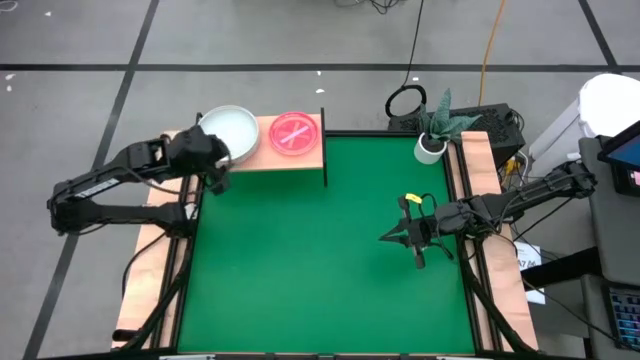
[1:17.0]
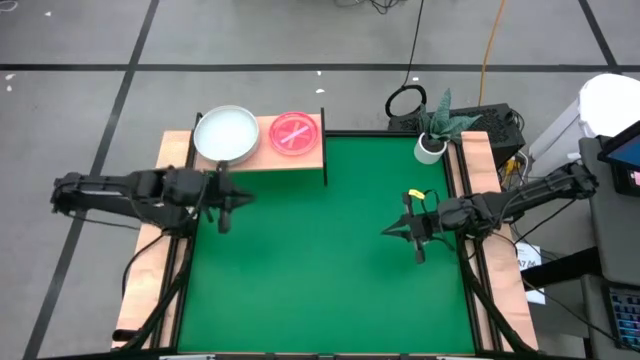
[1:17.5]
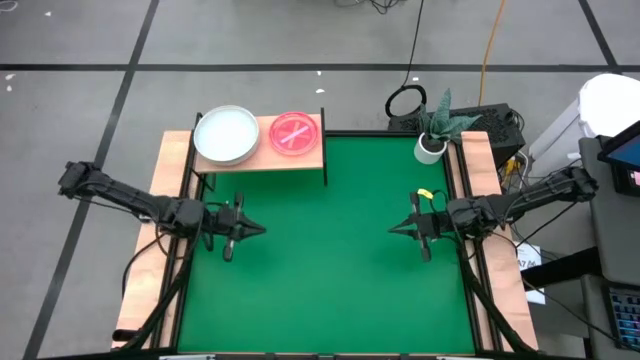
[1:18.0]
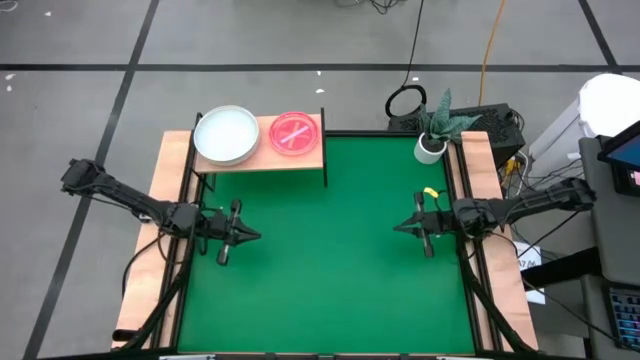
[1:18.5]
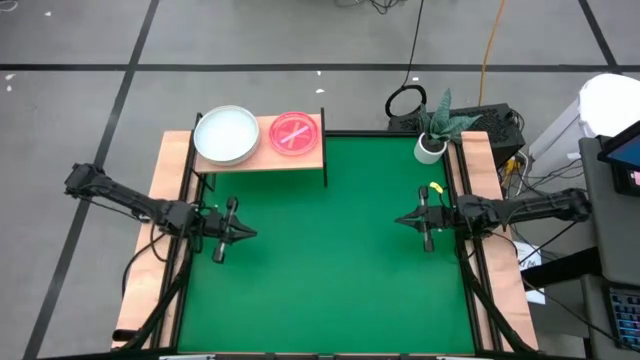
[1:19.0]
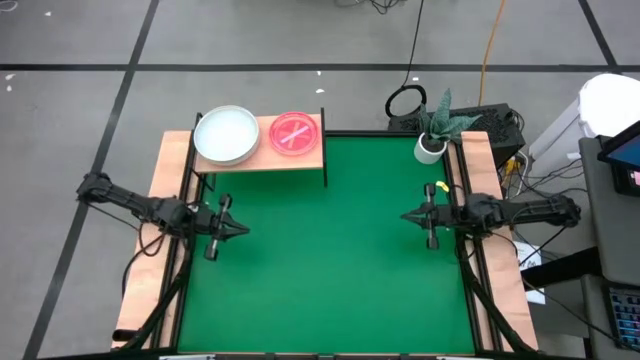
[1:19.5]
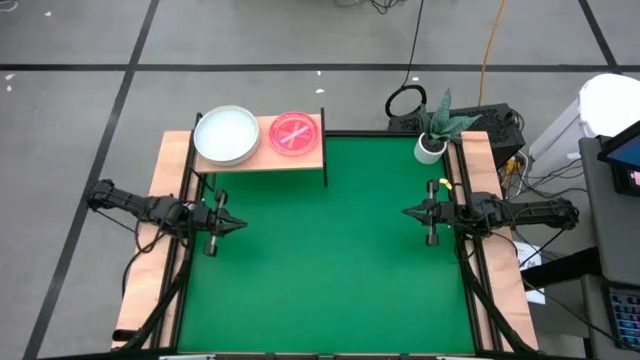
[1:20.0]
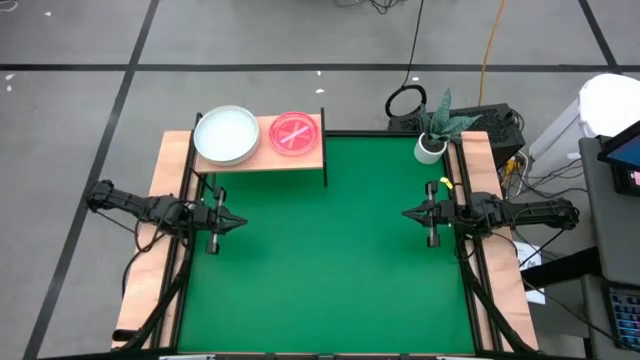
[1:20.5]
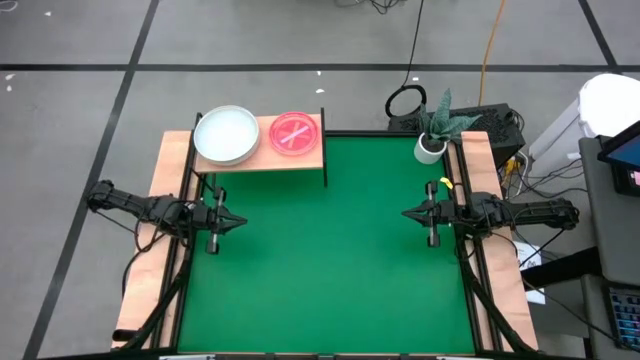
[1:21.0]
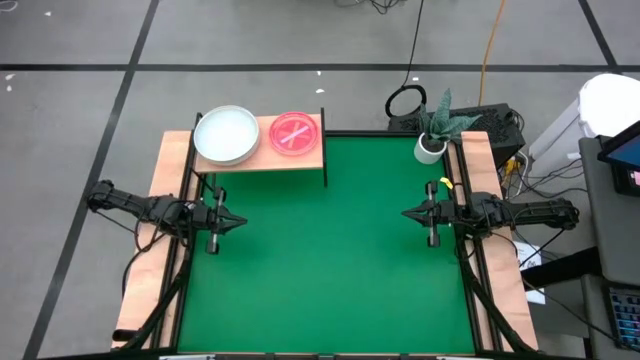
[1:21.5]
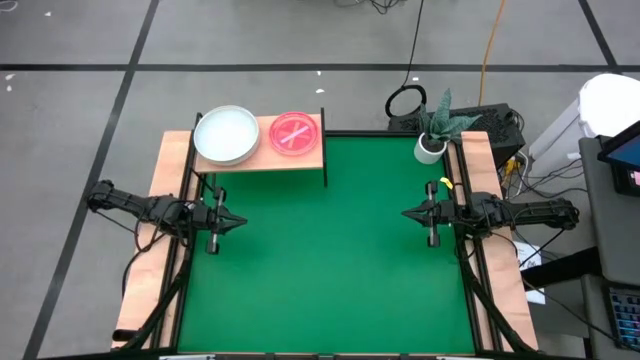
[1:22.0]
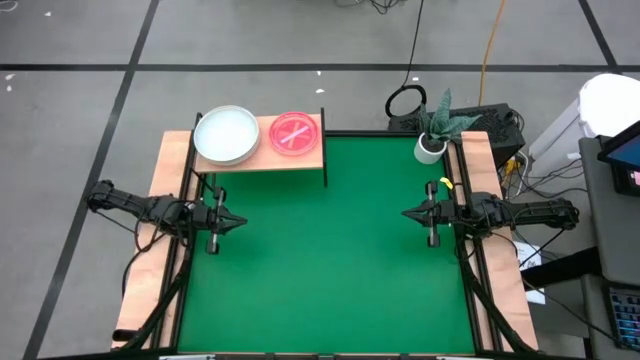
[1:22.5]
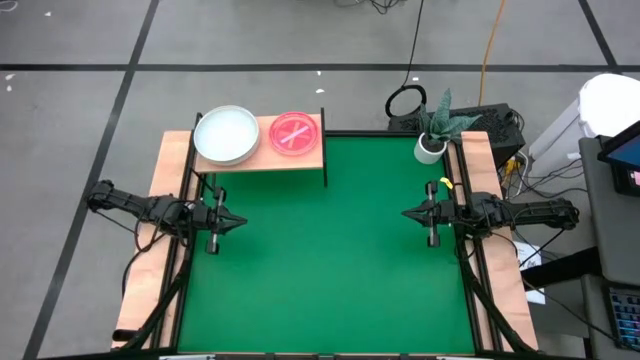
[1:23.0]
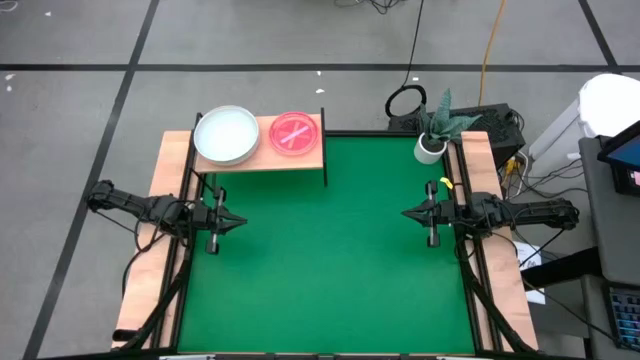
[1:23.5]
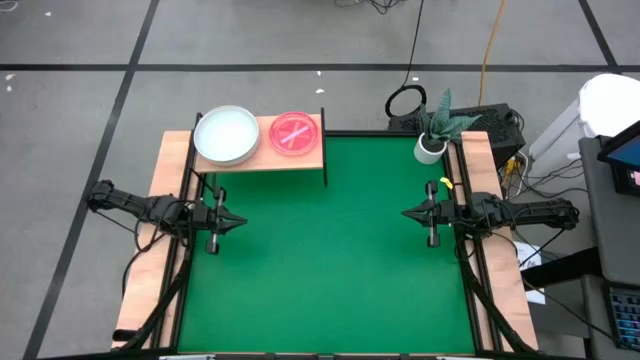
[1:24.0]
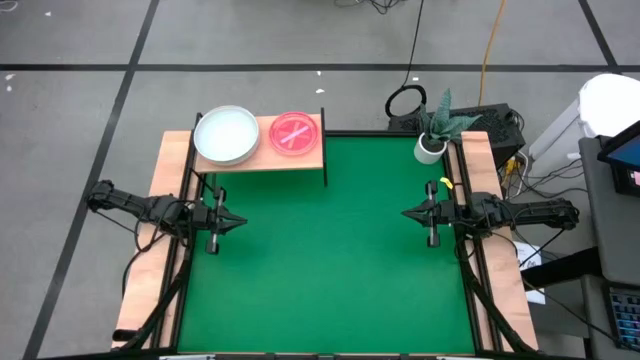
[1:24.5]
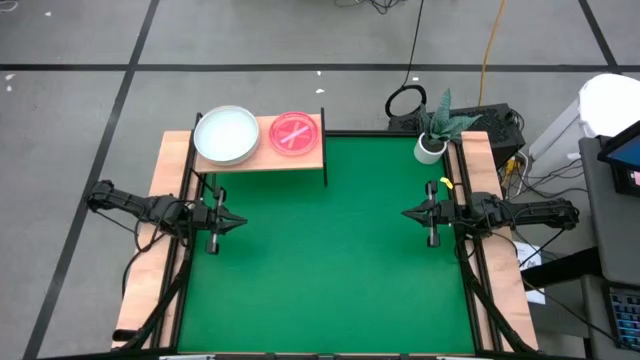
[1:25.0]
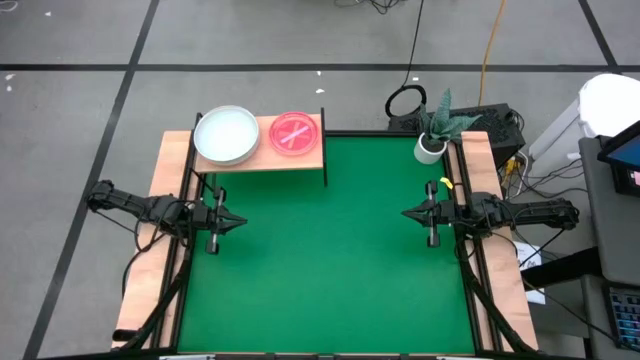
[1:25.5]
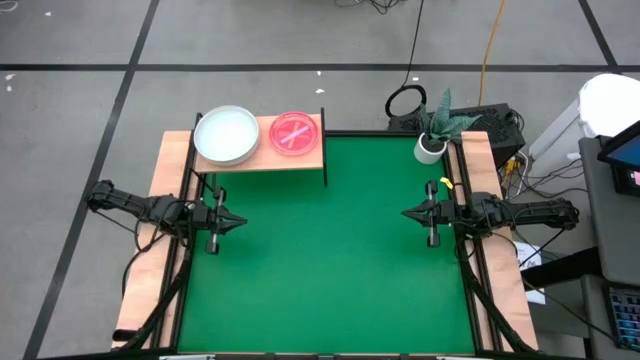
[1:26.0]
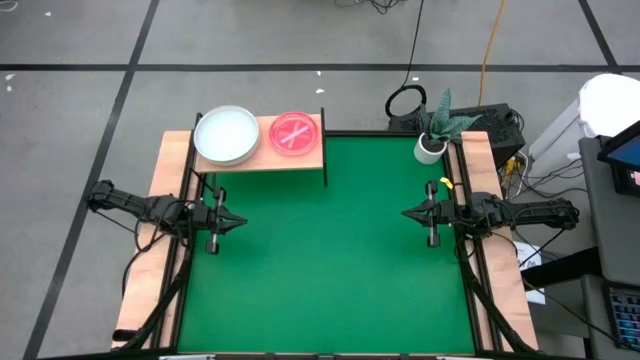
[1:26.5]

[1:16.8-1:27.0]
Task: Place and stack plates onto a shelf
Return to Home Position

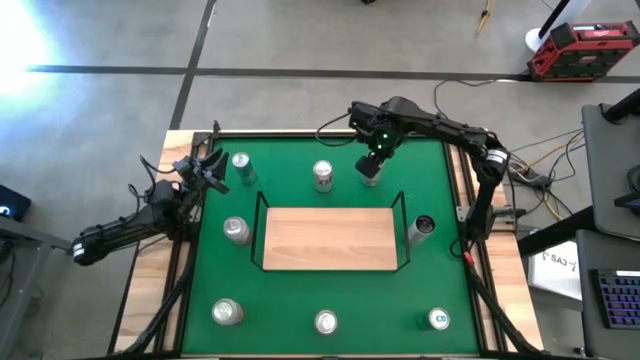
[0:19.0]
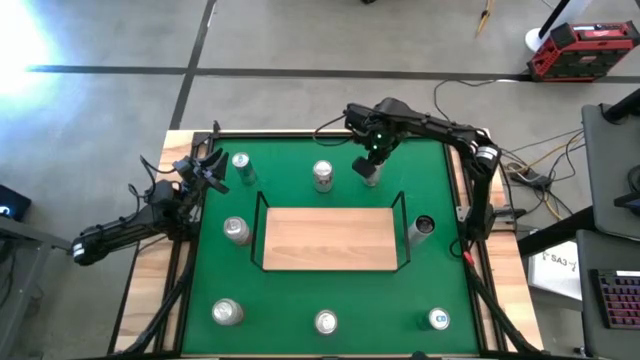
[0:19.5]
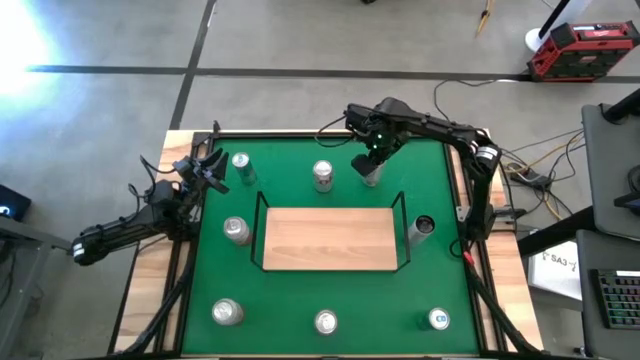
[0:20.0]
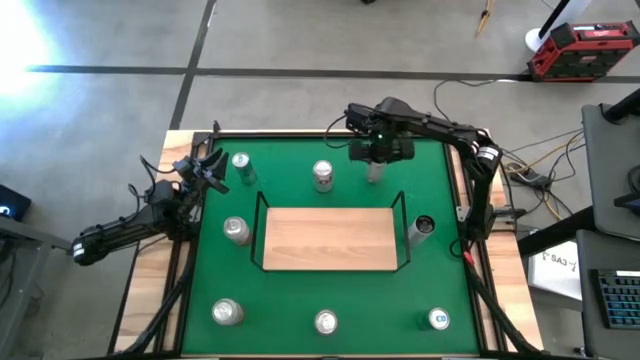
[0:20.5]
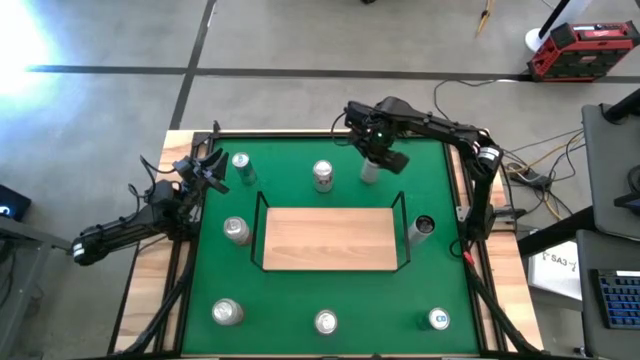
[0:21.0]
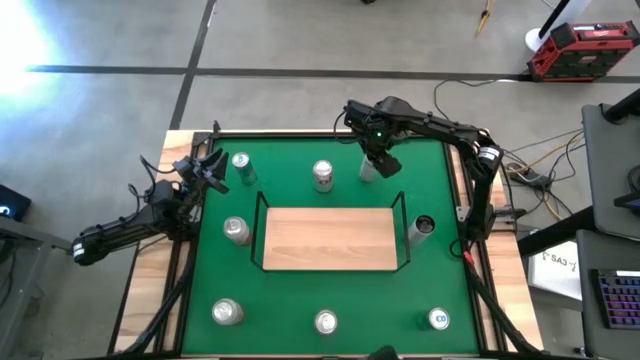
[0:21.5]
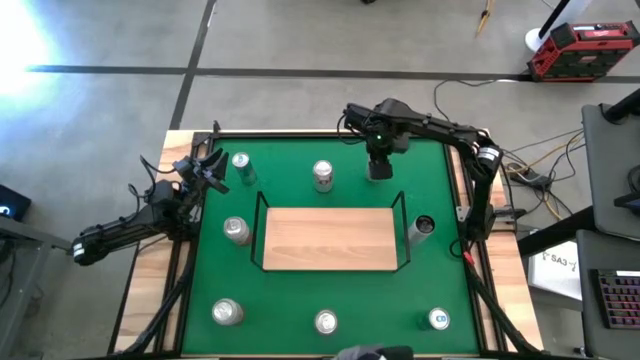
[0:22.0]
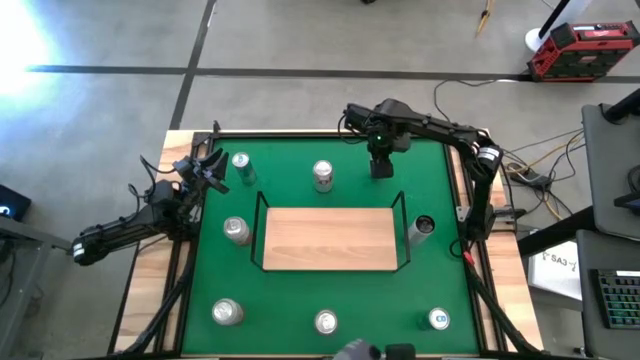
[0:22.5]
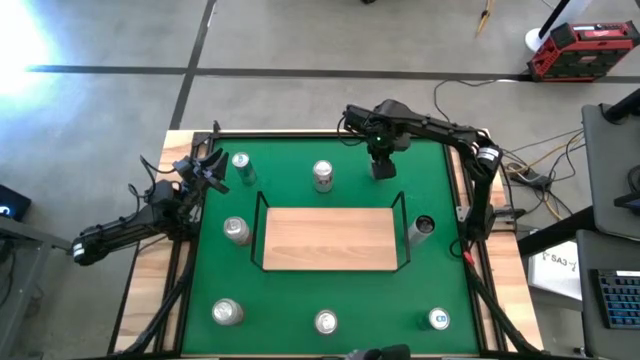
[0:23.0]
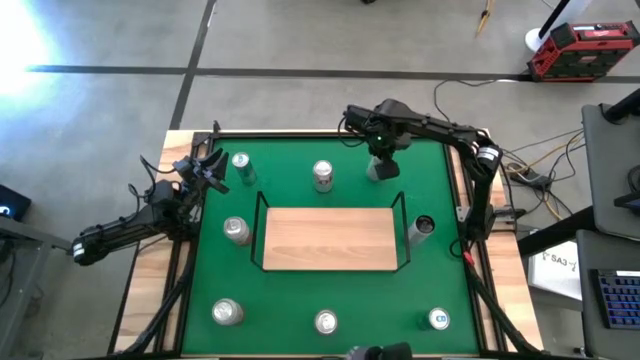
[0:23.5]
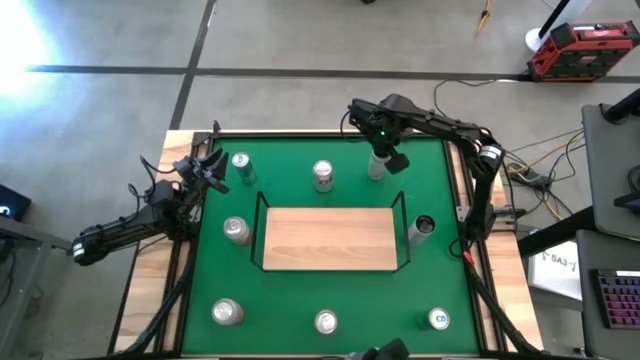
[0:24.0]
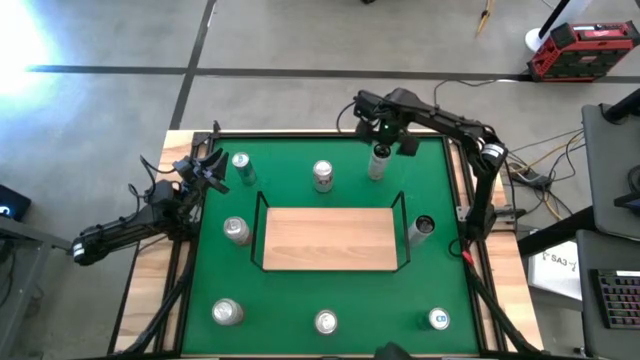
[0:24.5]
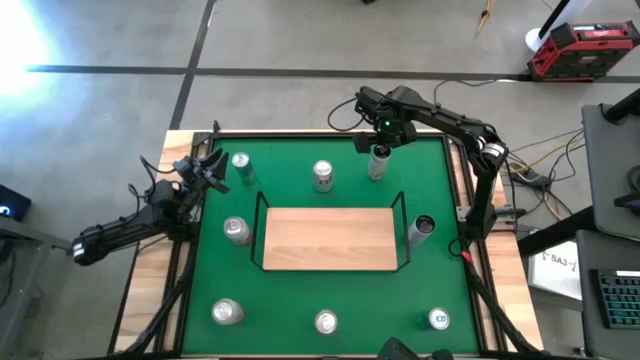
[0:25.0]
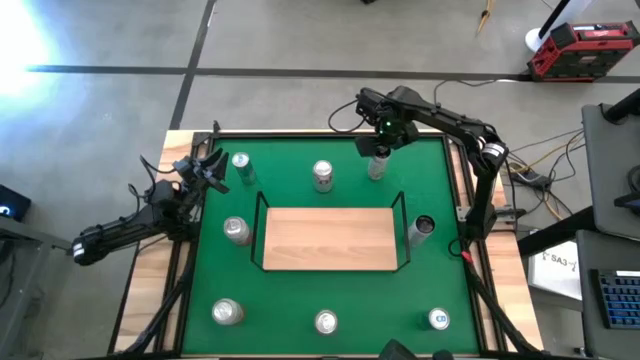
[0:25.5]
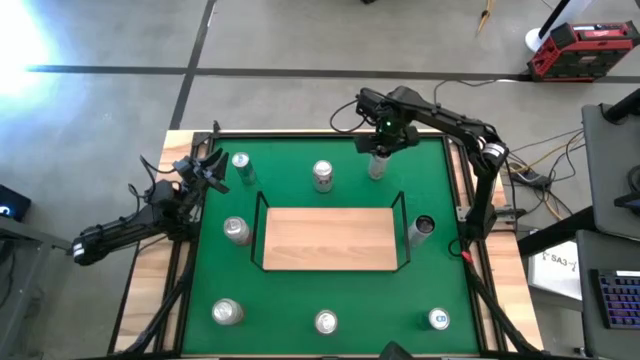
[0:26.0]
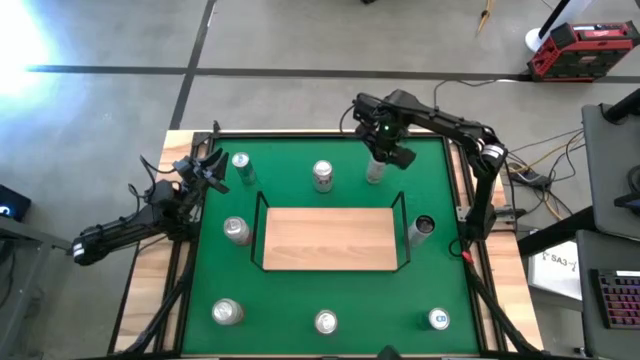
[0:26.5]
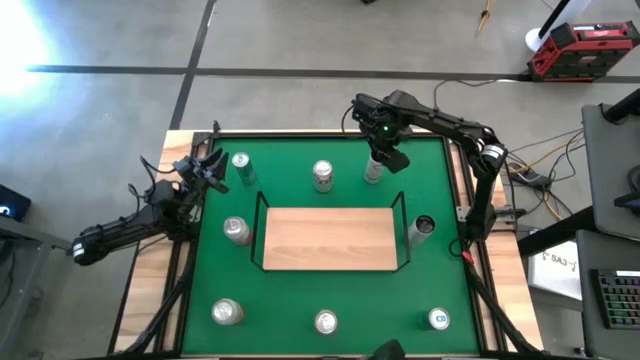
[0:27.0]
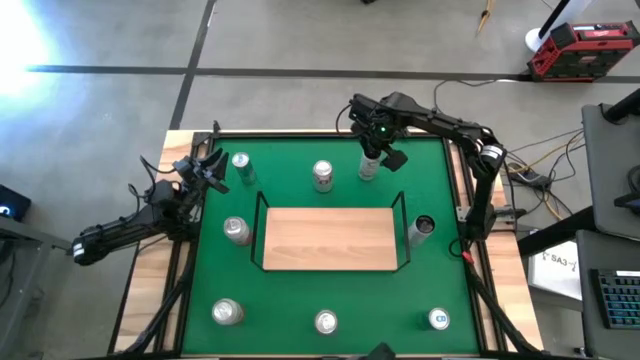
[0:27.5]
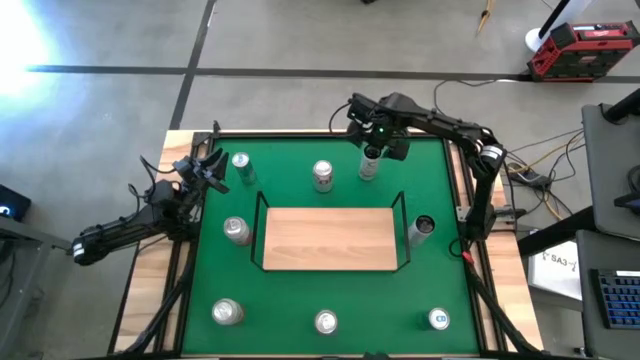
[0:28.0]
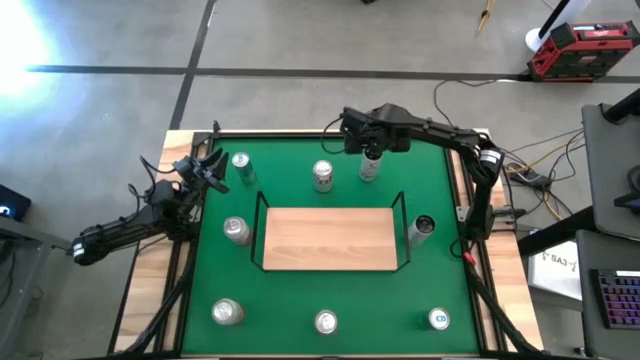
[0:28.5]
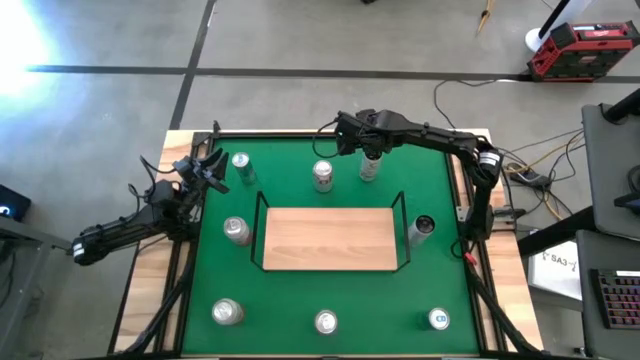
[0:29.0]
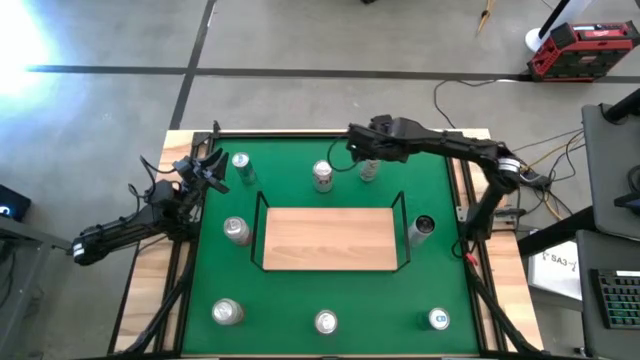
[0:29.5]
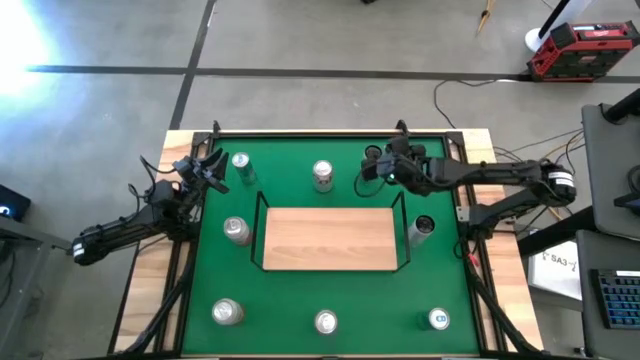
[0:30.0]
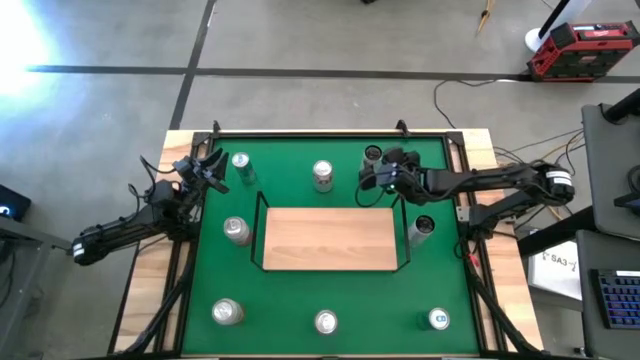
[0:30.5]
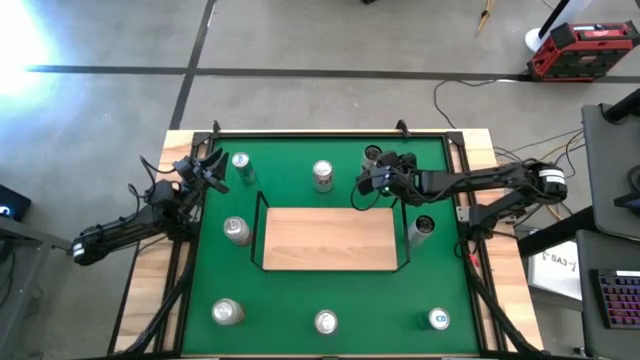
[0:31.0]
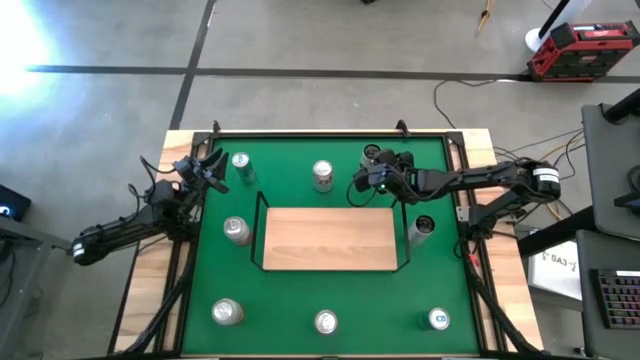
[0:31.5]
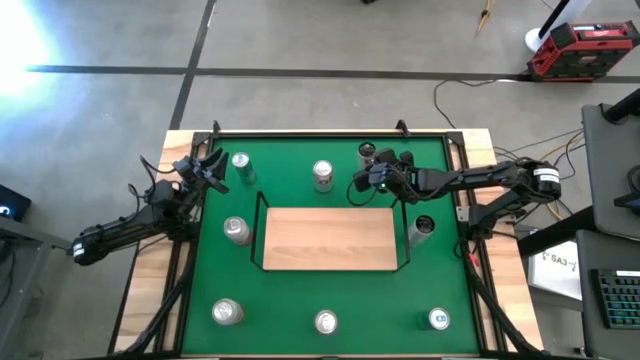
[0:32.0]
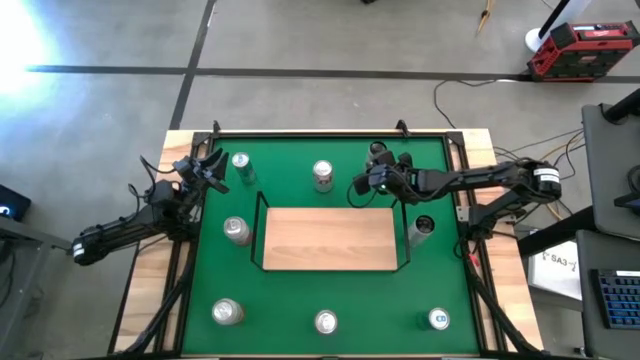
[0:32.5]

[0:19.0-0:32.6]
Task: Place canned beverage on shelf
Put the top white-yellow soda can on the shelf
